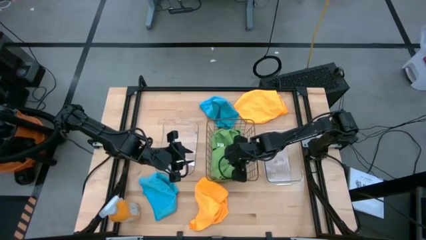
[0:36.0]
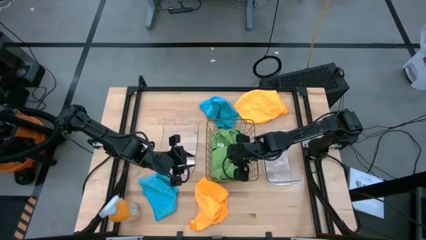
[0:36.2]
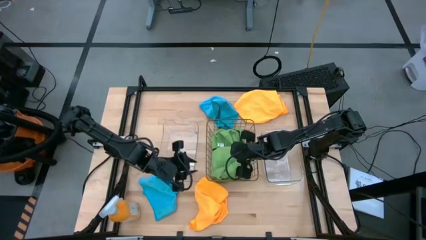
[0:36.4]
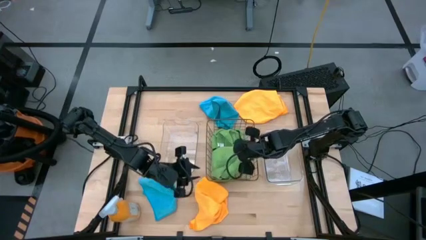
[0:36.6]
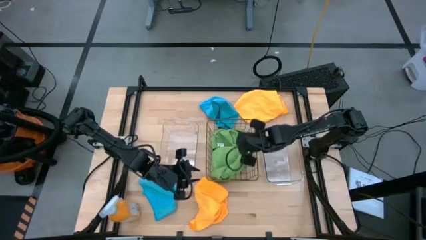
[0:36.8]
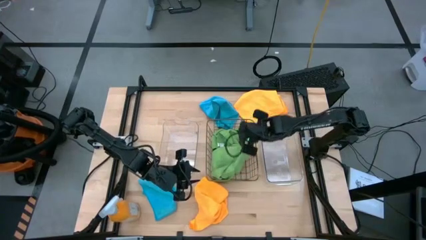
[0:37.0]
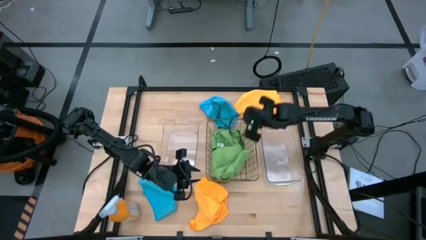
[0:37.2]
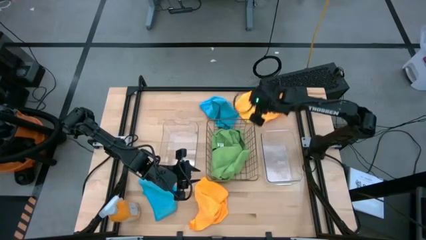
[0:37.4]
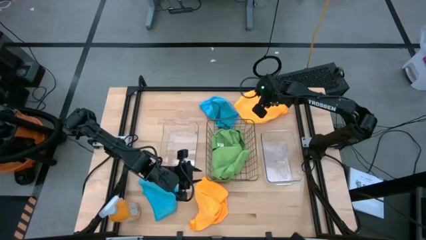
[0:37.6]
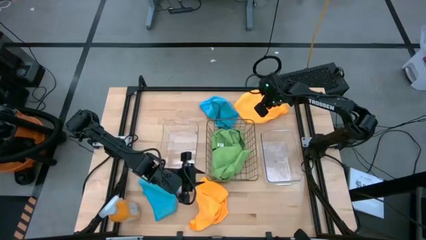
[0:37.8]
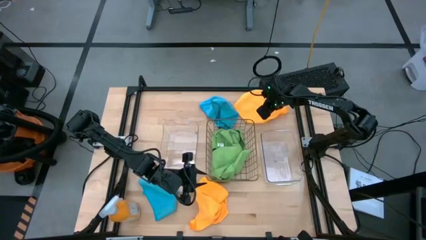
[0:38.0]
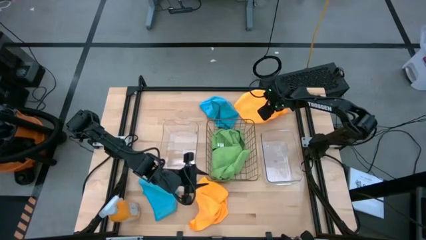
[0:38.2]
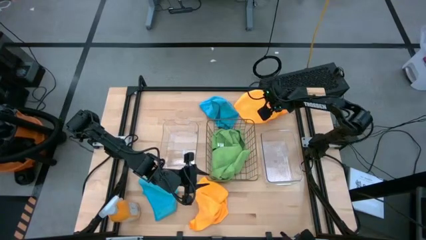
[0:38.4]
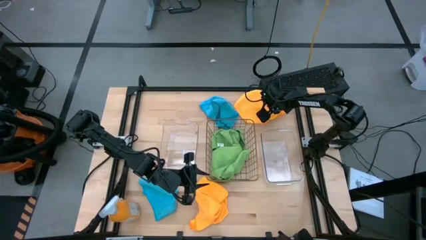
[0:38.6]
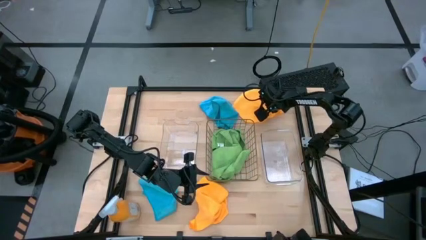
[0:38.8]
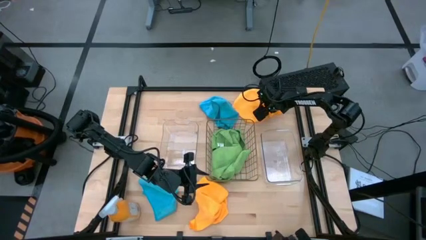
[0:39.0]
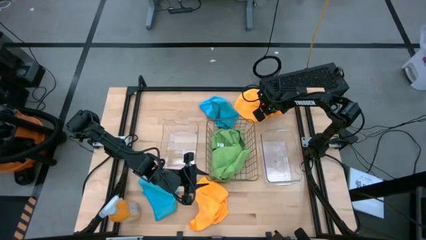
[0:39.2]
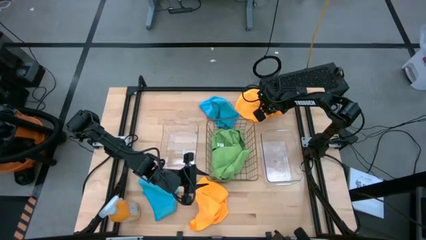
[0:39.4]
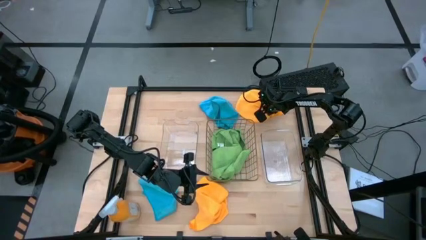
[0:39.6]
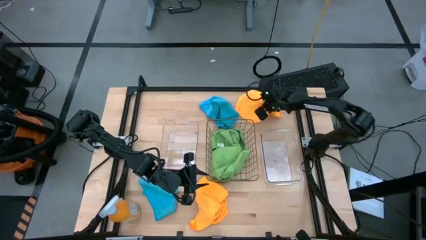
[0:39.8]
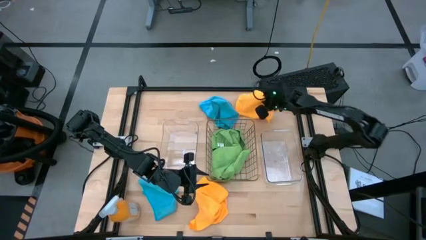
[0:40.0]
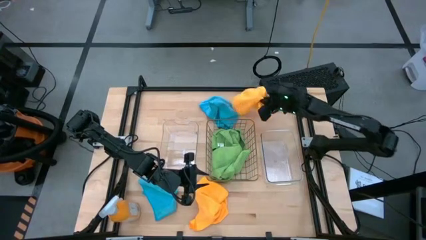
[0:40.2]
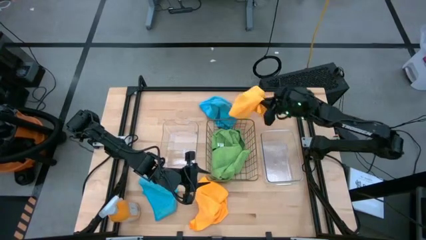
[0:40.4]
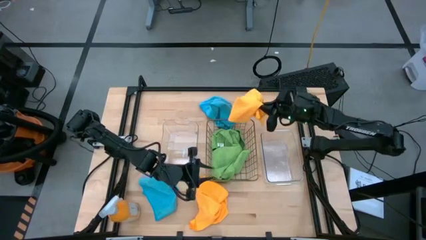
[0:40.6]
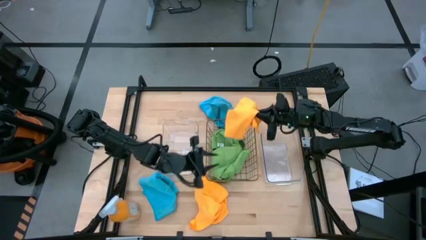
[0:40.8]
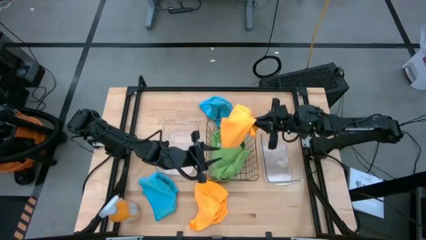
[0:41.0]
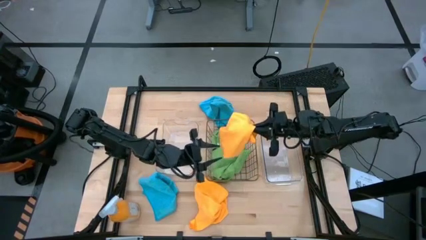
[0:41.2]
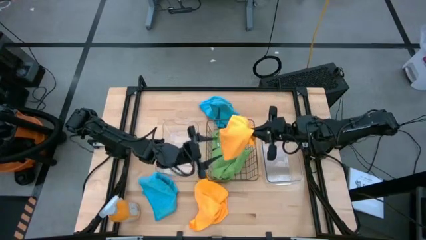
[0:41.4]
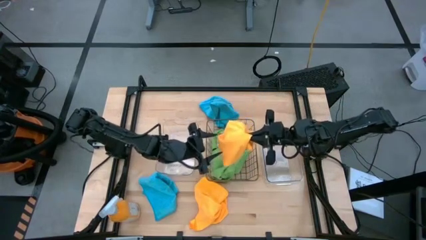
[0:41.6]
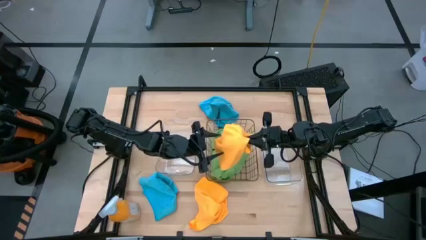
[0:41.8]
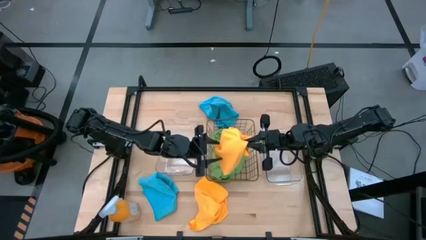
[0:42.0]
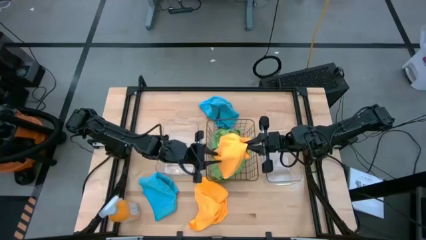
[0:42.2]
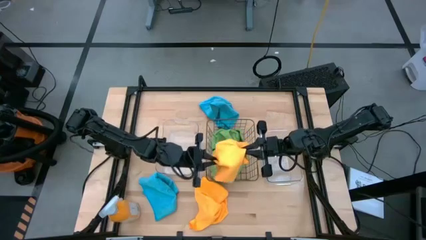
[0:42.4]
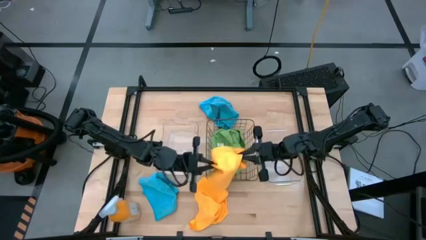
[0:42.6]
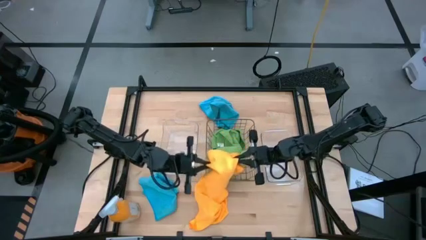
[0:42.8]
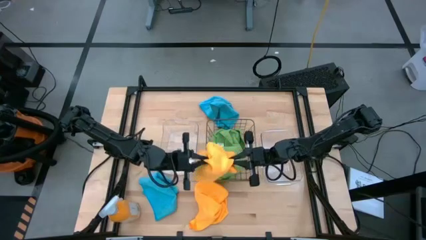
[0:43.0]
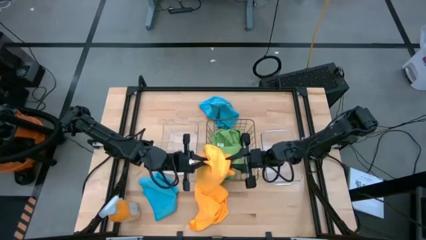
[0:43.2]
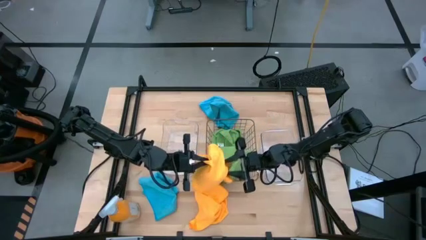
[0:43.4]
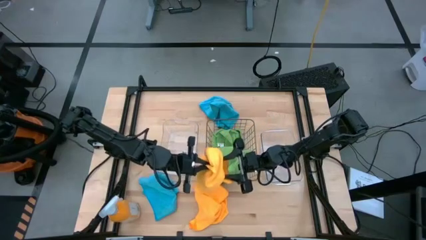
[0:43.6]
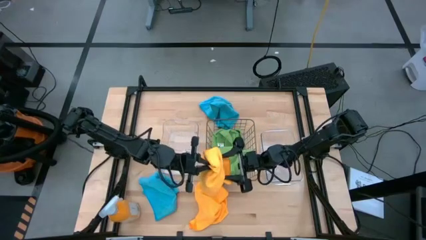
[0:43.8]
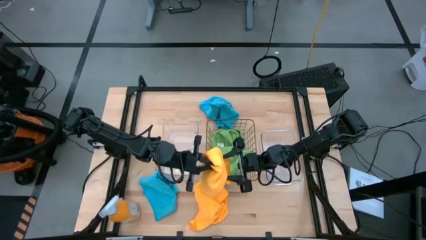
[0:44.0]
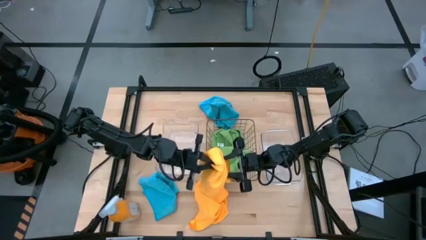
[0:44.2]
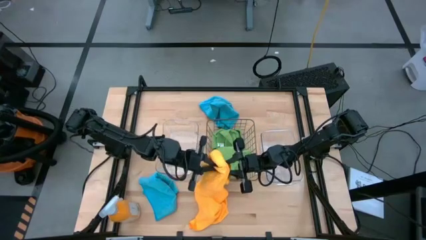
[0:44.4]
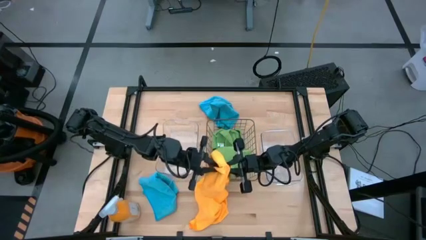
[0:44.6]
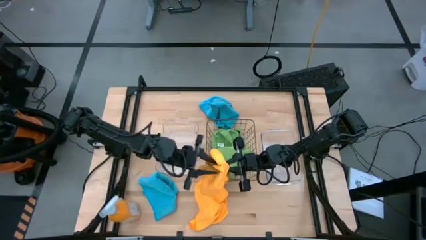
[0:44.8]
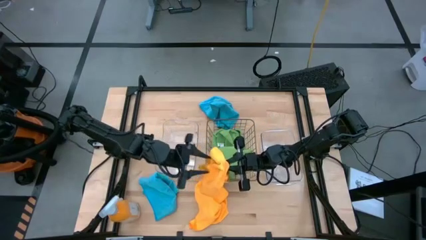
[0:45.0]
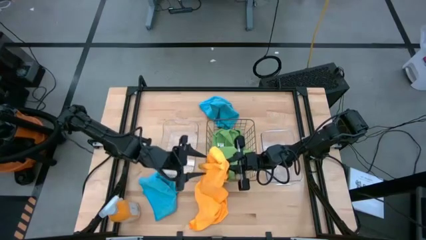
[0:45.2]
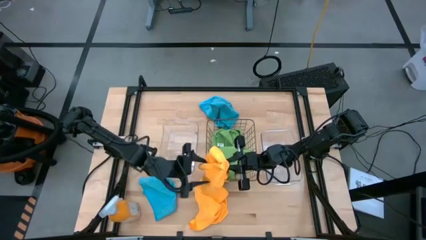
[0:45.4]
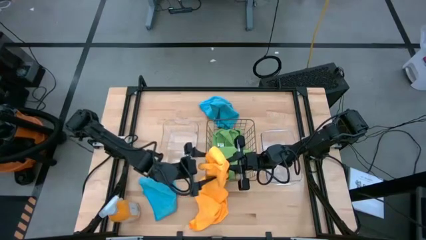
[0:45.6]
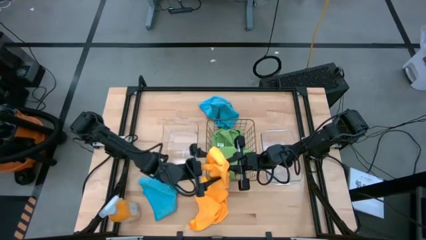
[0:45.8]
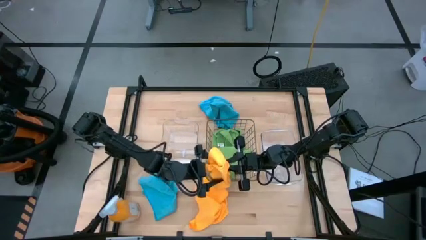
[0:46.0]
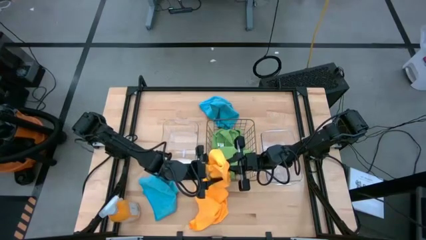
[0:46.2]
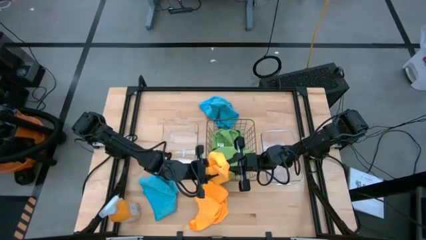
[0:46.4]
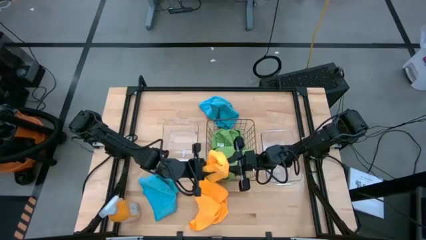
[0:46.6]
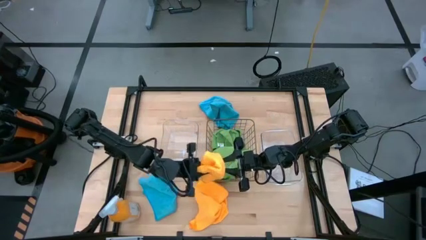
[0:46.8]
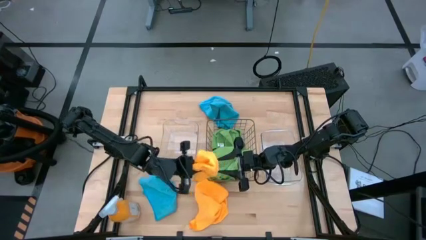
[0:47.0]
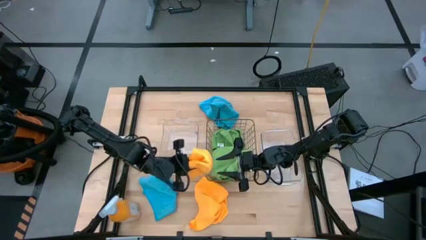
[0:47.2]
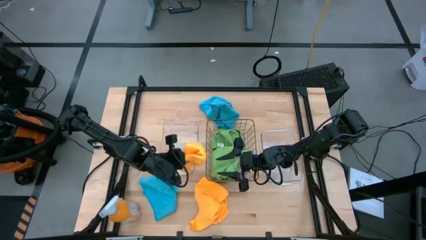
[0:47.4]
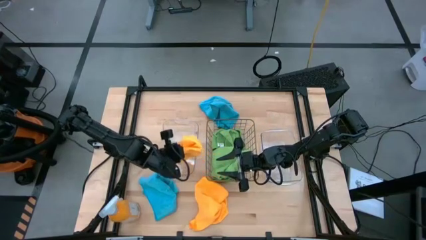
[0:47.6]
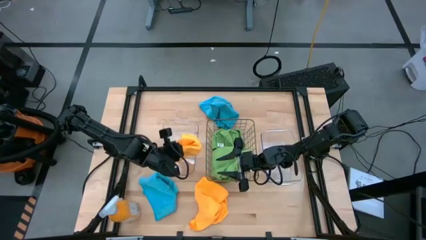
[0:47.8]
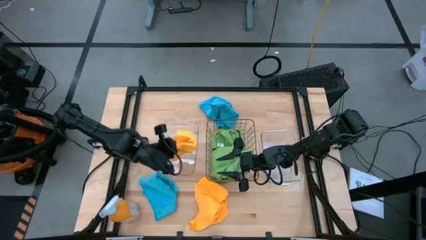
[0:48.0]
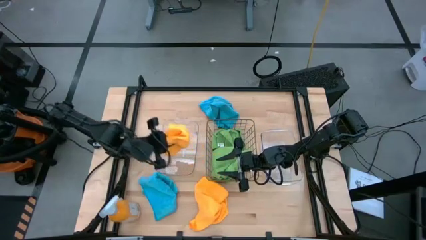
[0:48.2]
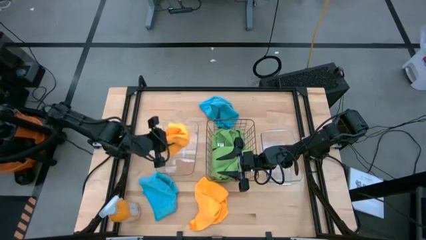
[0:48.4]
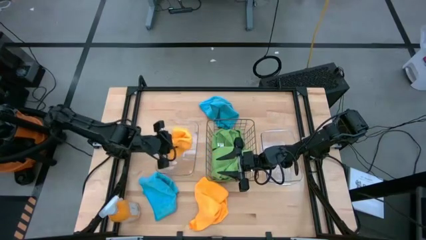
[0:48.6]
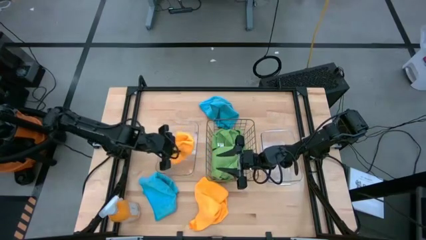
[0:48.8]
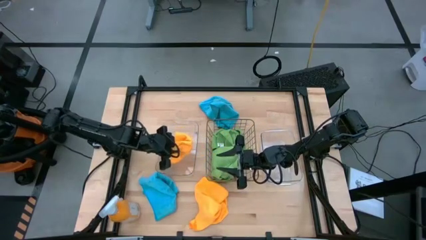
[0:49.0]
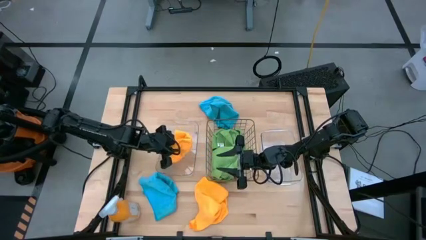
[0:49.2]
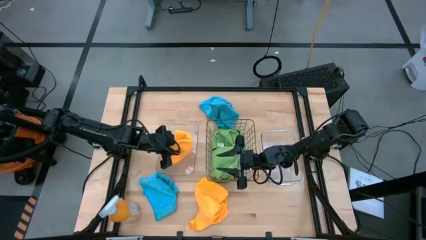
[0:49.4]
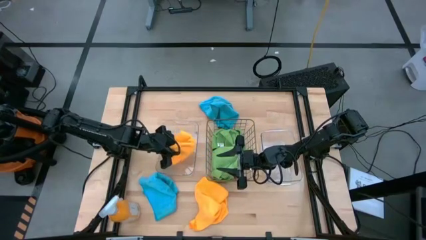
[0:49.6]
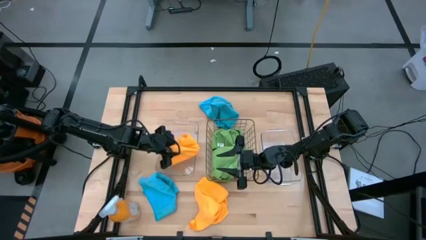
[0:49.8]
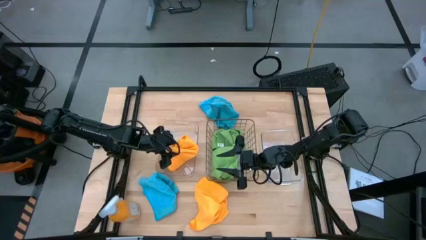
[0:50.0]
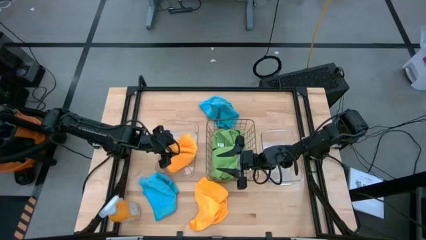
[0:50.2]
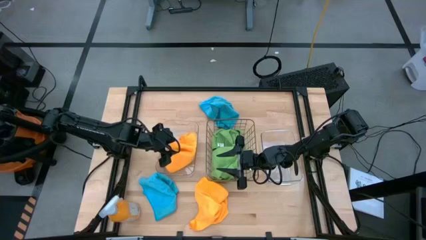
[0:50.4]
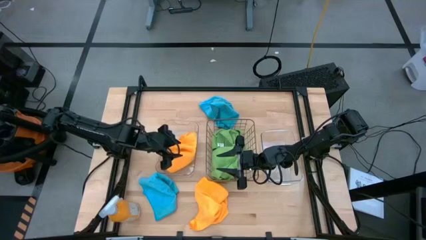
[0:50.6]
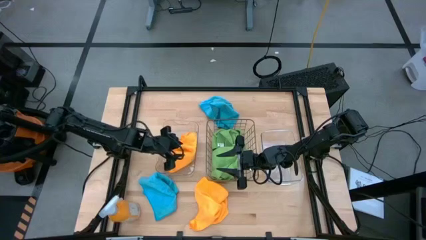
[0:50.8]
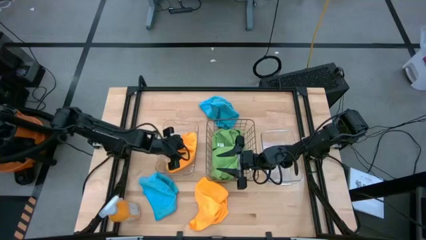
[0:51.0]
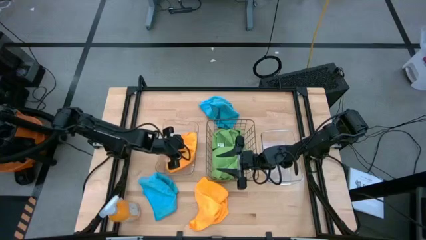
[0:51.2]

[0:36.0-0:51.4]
Task: Sort microfiber towel by color & place in baskets
Put the top yellow microfiber towel into the left transparent bin
